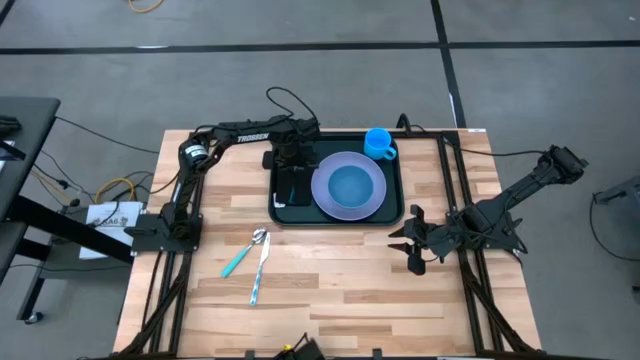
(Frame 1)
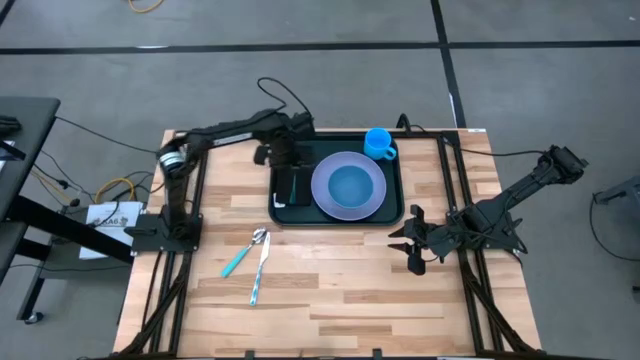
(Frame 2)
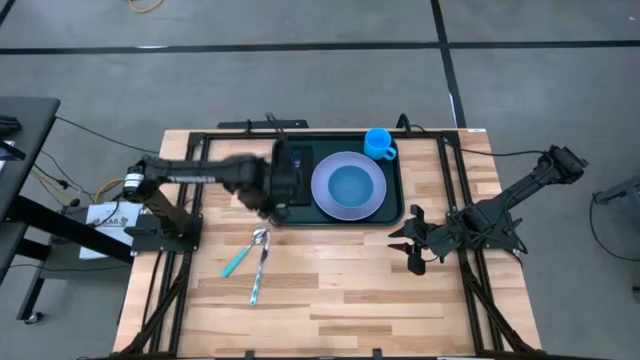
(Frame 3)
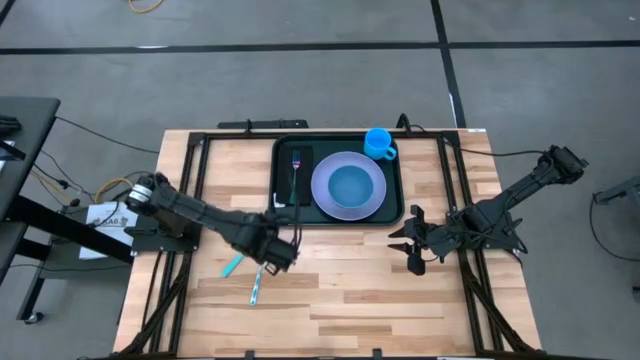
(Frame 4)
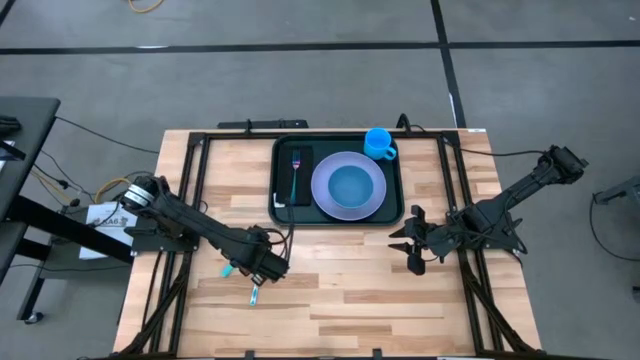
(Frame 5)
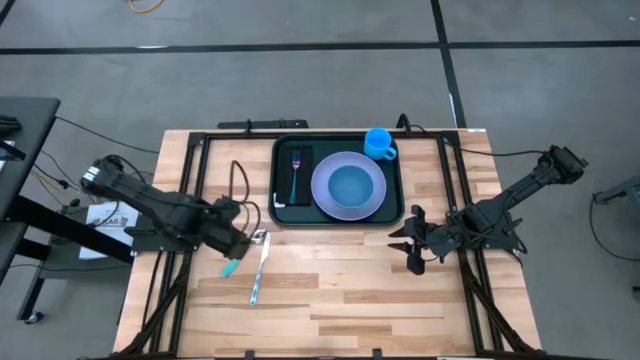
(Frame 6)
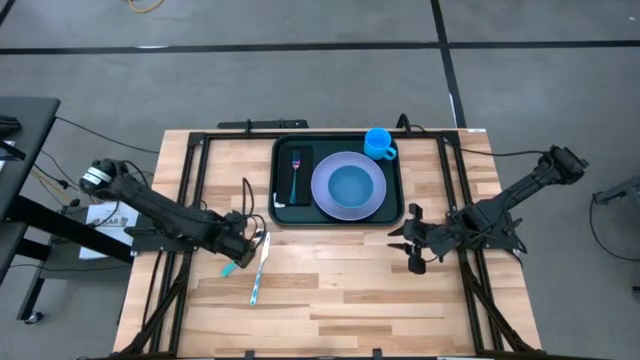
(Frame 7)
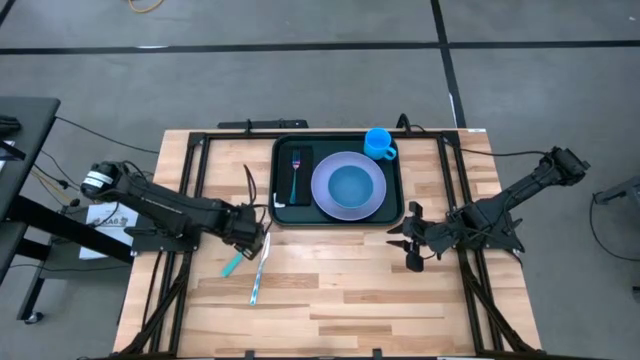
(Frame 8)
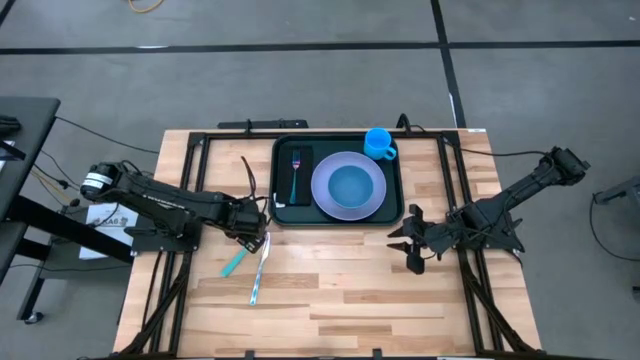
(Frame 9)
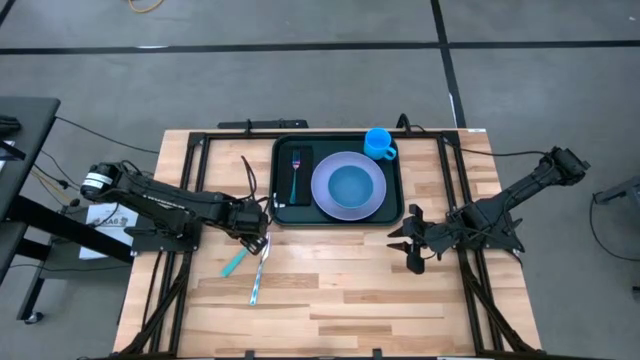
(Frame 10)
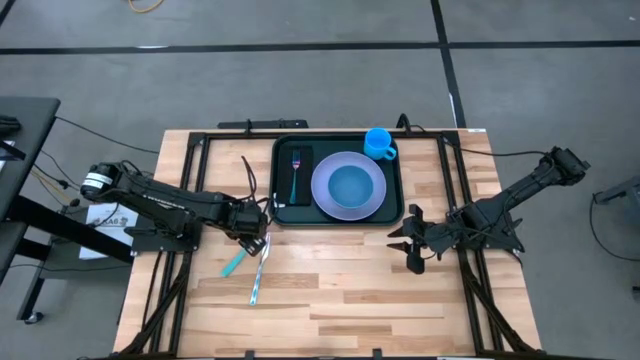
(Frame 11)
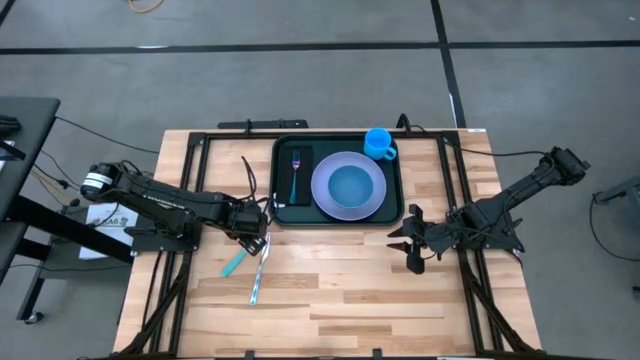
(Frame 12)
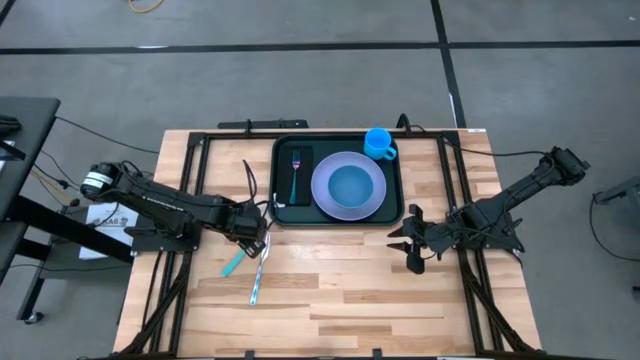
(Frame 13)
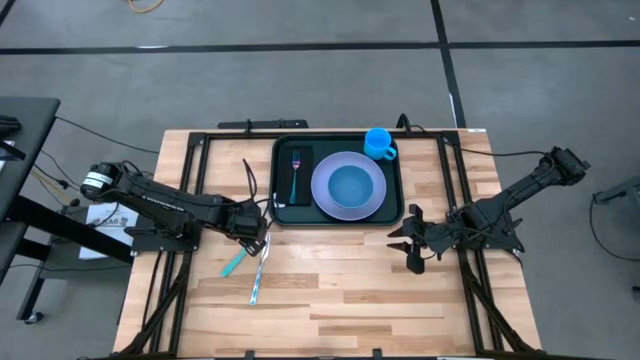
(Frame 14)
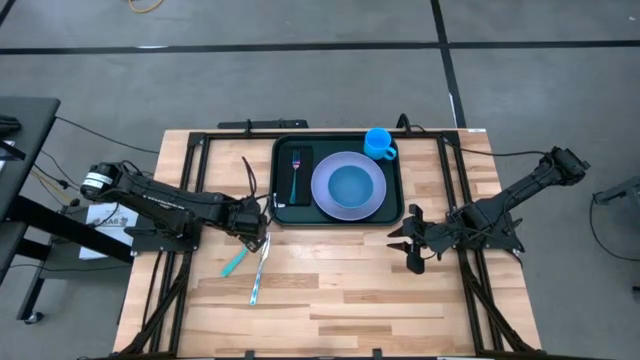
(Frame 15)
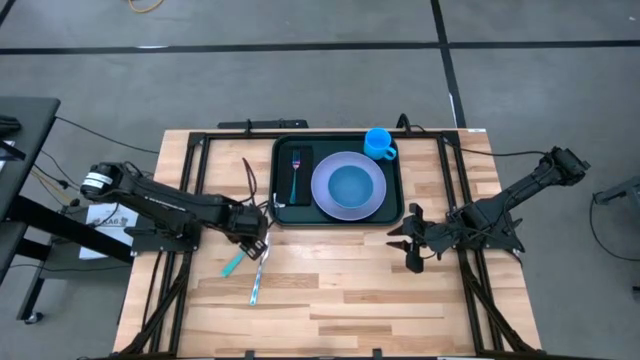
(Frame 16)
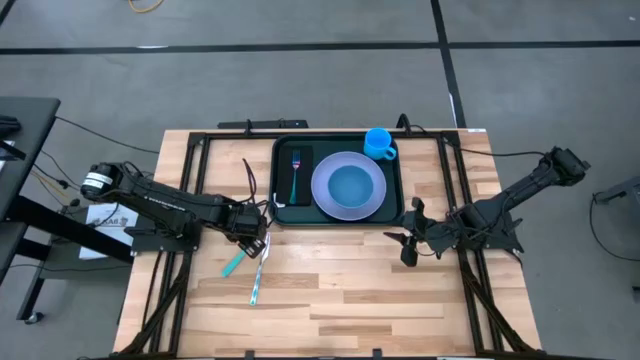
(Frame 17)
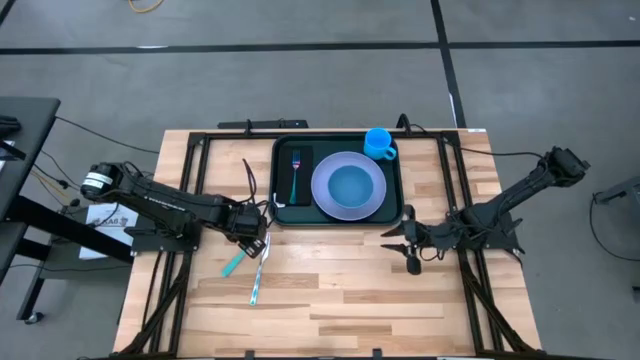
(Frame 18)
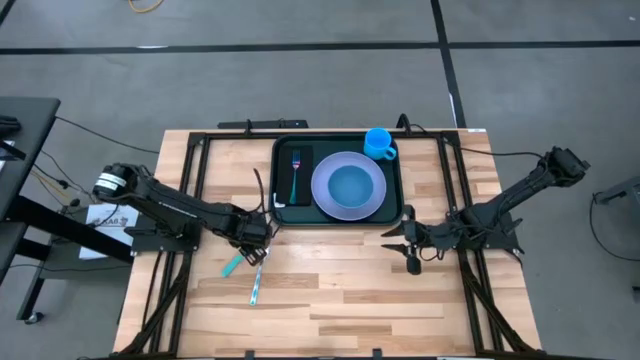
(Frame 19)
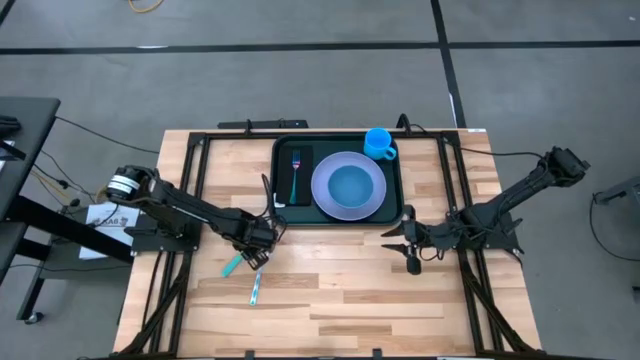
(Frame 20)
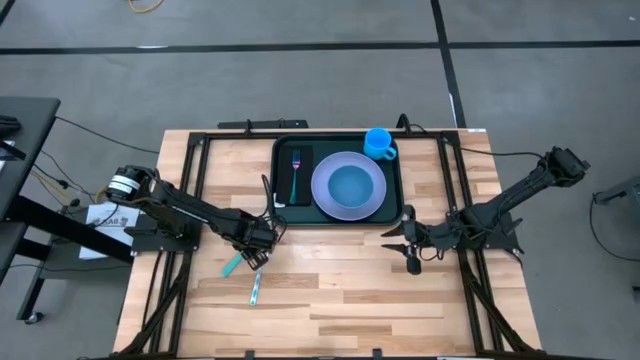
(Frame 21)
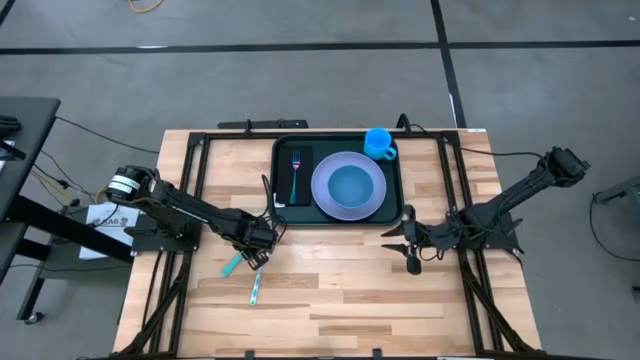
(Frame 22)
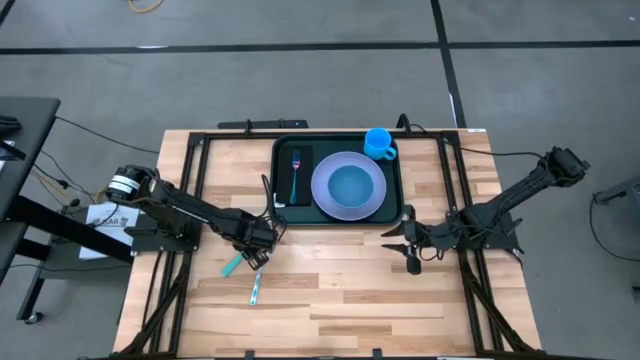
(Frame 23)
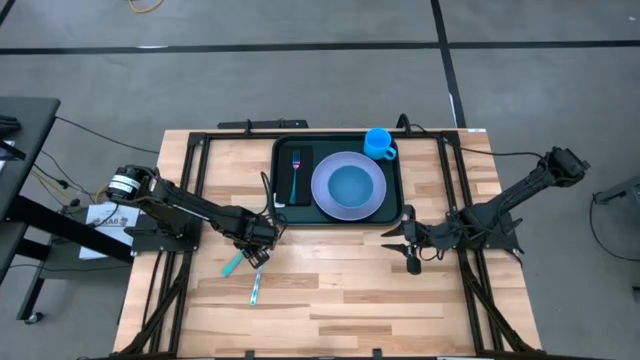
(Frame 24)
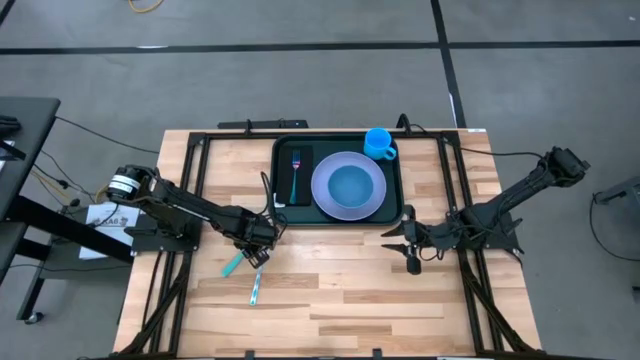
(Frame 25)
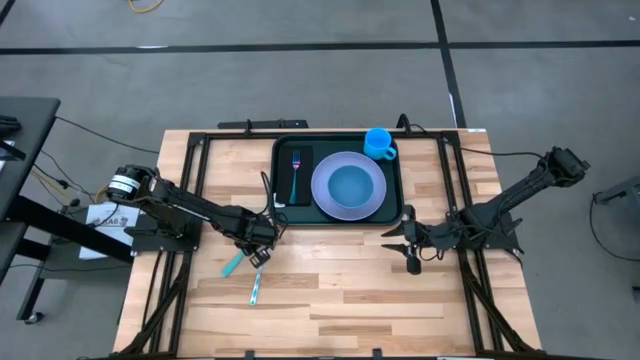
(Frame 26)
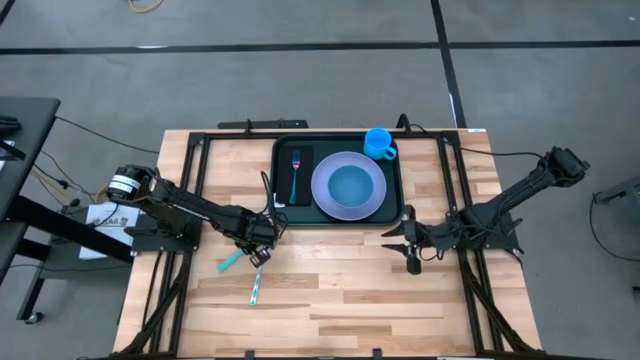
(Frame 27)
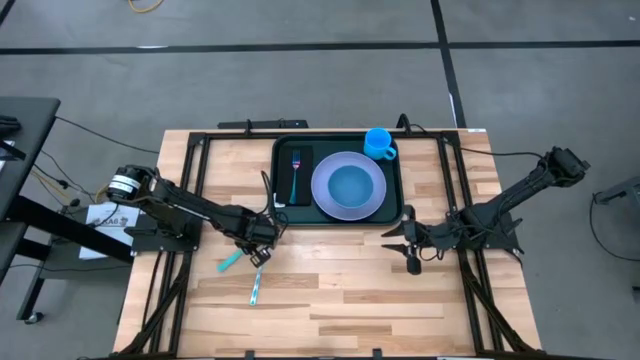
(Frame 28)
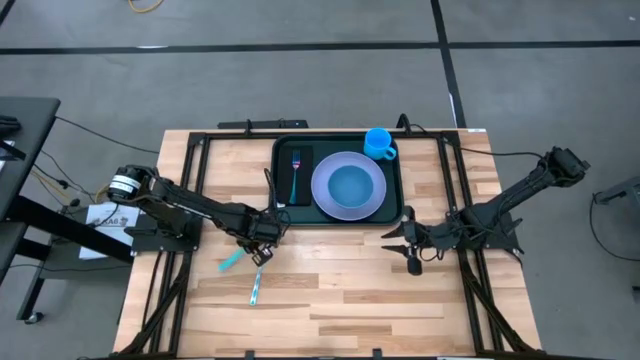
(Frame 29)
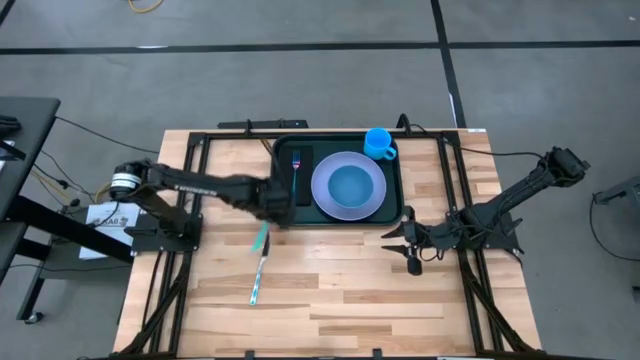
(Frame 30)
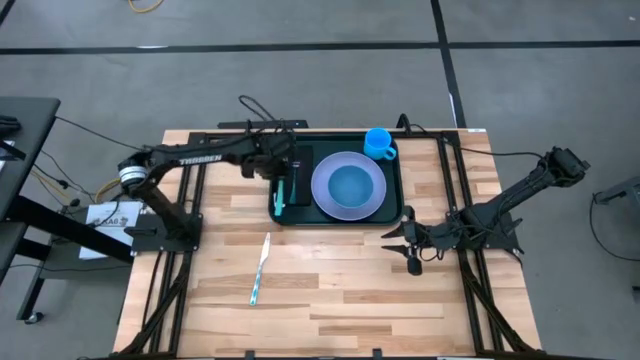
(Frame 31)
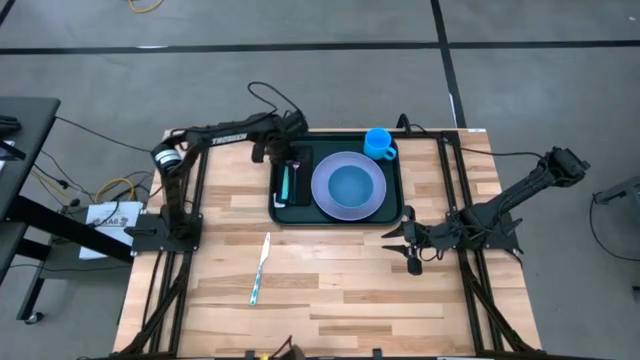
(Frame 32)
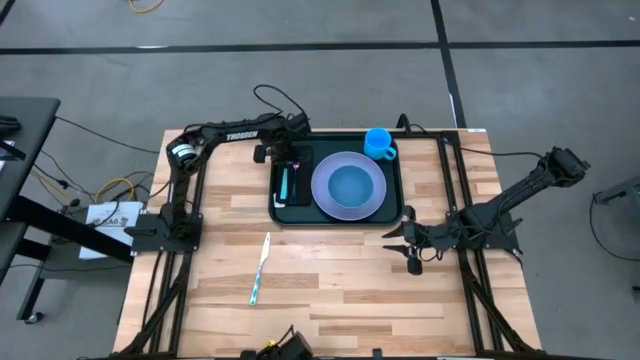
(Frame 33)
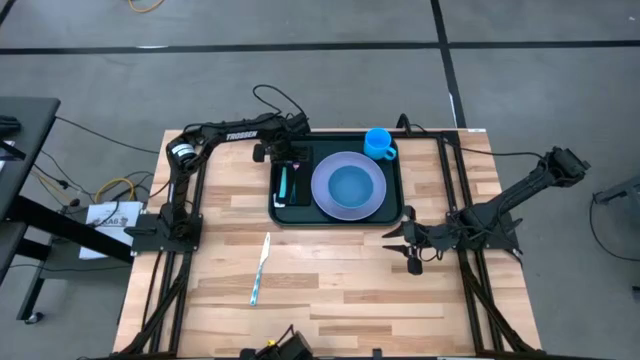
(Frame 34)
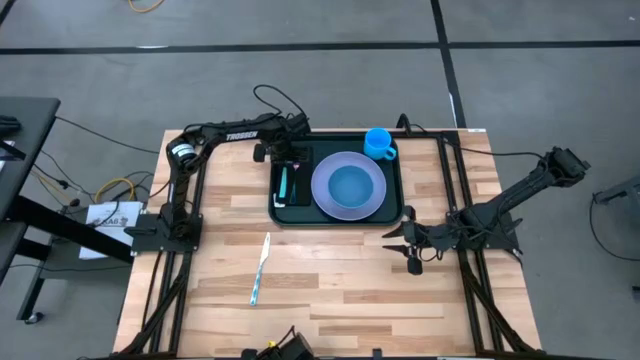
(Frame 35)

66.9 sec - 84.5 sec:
Task: Set up tray
Put the light blue spoon on top of the black napkin to the left side of the blue fork

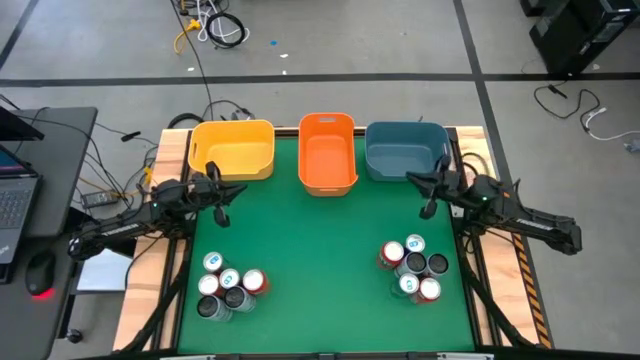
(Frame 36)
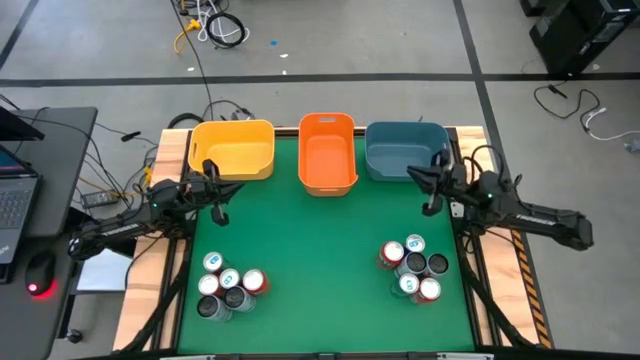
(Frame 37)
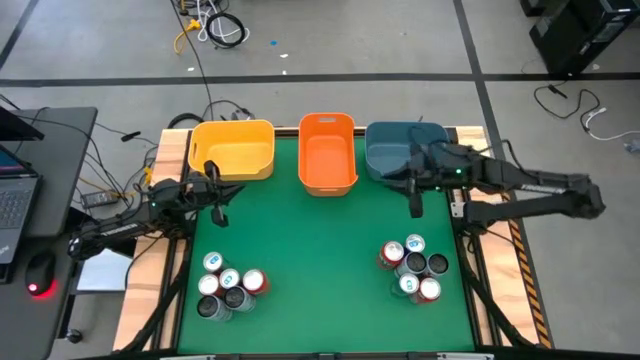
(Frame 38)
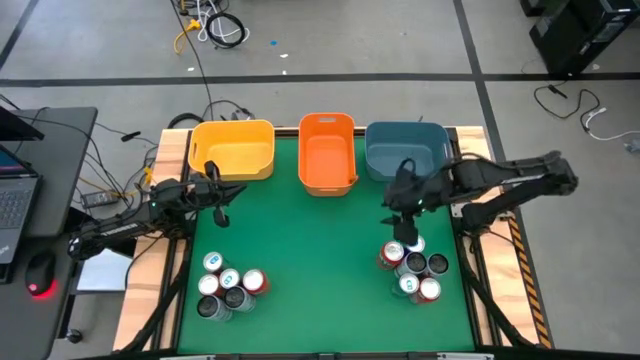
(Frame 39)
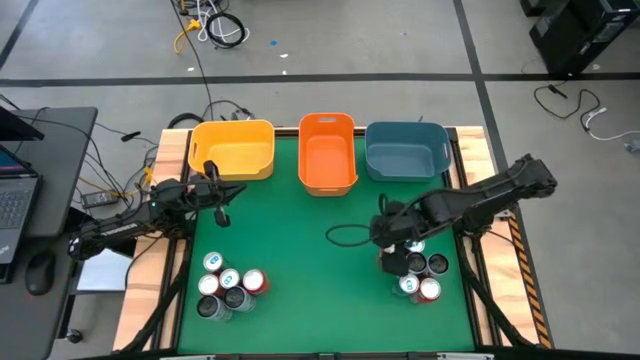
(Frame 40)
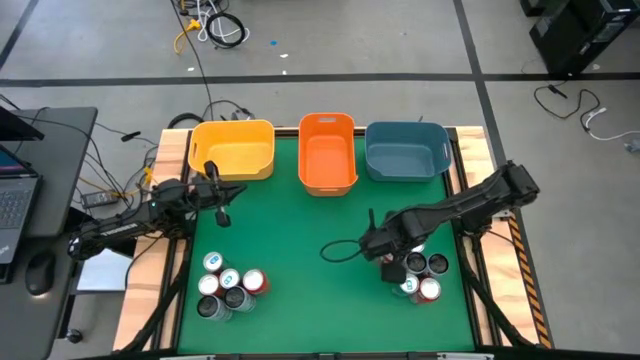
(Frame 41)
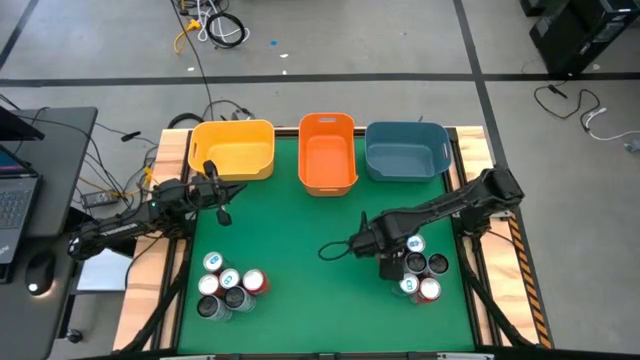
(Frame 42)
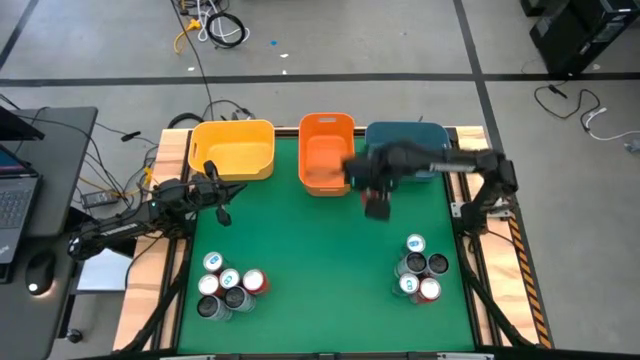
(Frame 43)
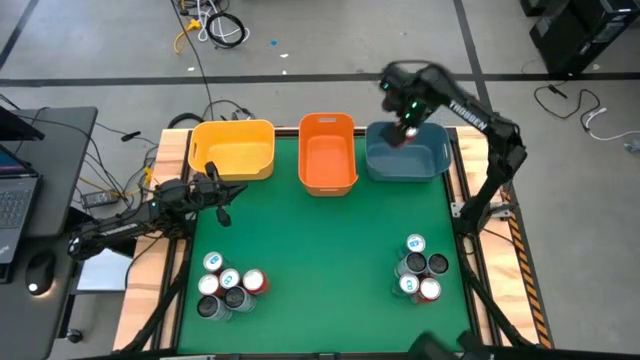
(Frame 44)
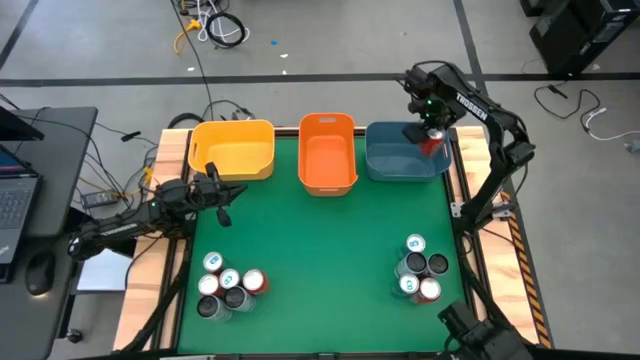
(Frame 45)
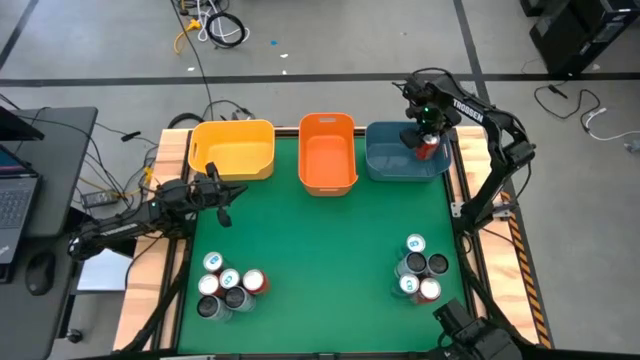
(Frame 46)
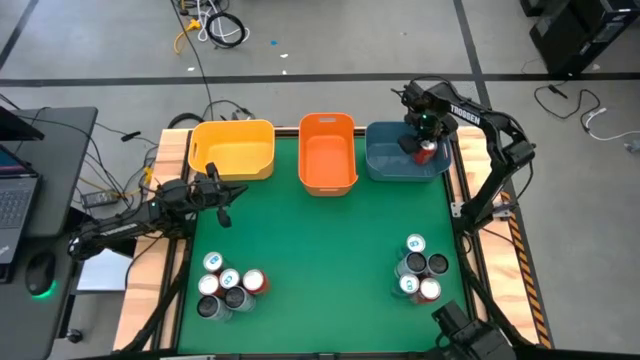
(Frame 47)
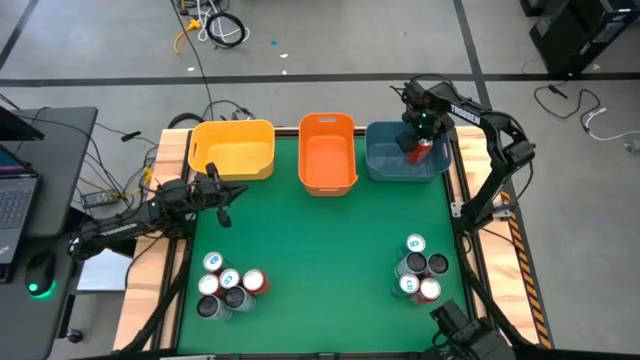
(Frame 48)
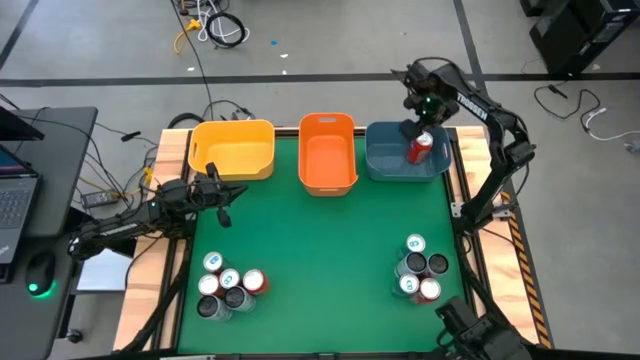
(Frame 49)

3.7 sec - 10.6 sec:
Task: Sort soda cans
Put the orange soda can into the blue bin
